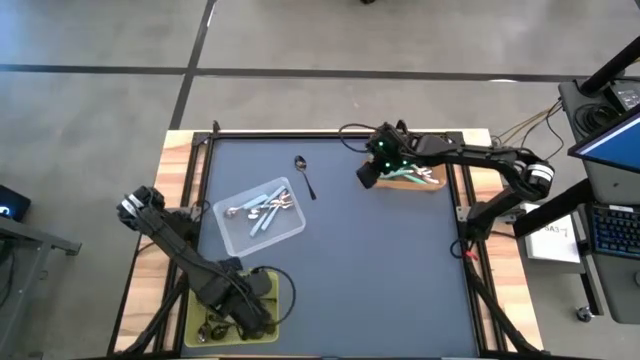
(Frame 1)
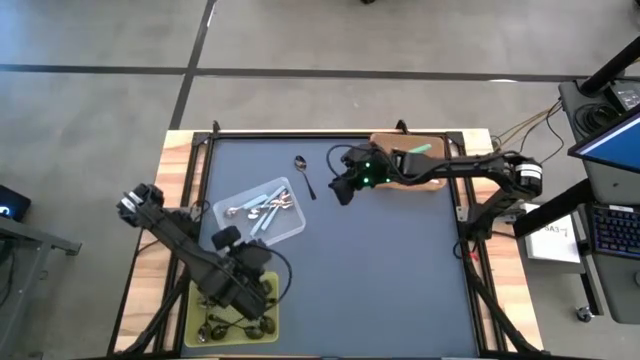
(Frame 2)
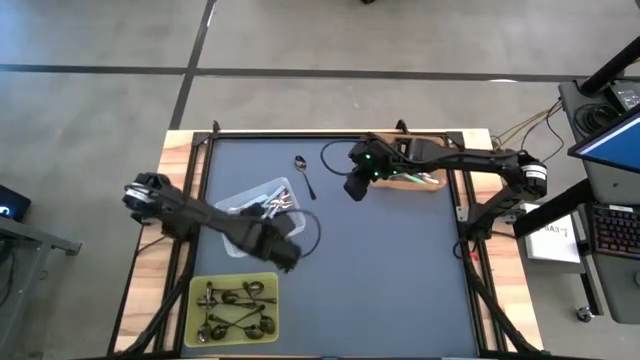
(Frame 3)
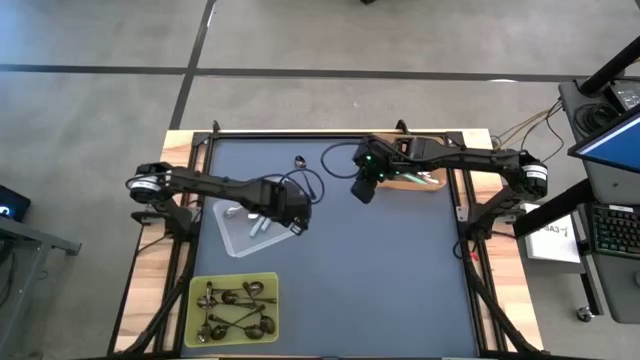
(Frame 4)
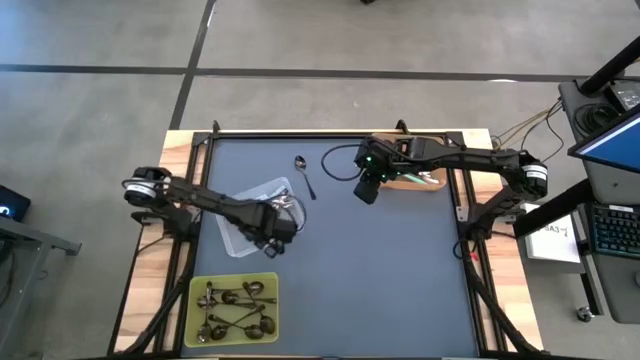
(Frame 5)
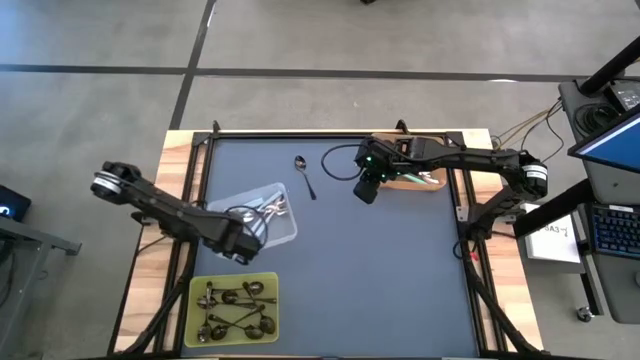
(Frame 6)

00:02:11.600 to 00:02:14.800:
Task: Sort silverware by color (type)
Put the black spoon into the yellow bin

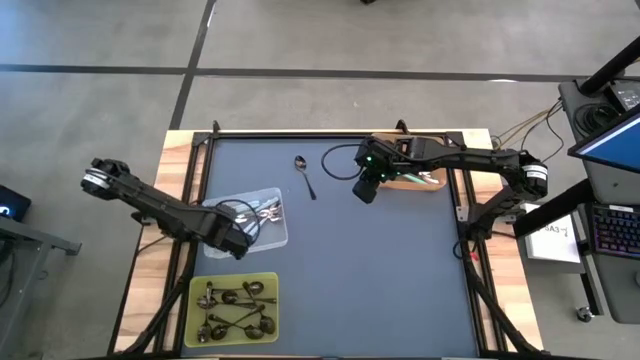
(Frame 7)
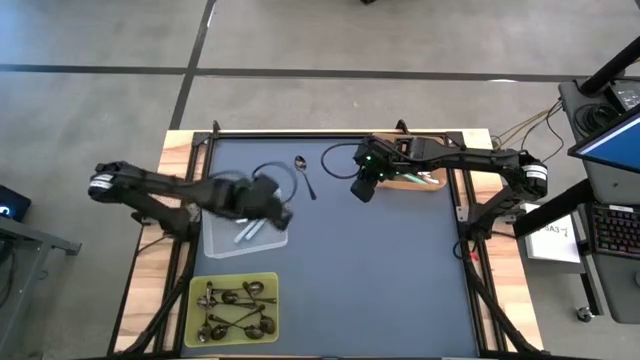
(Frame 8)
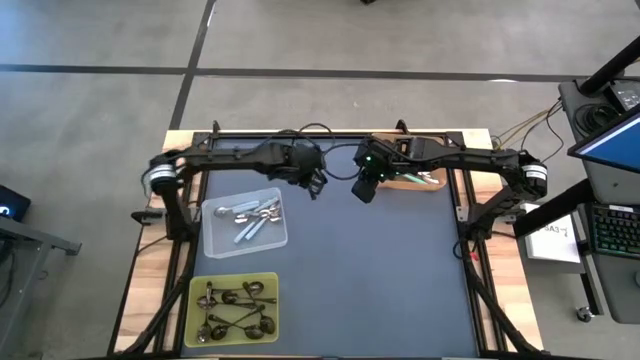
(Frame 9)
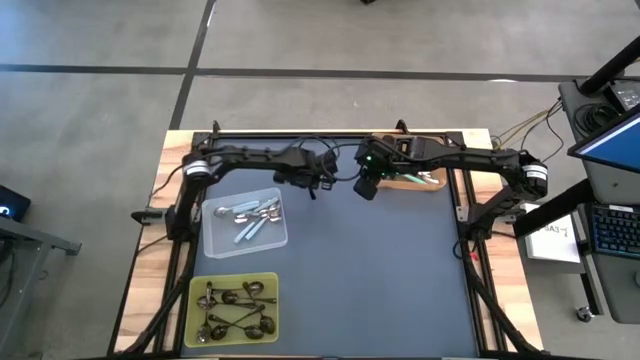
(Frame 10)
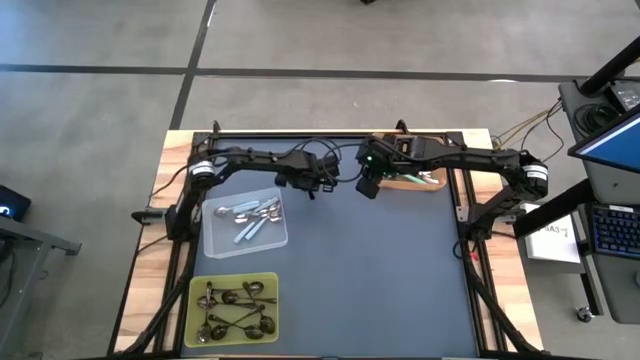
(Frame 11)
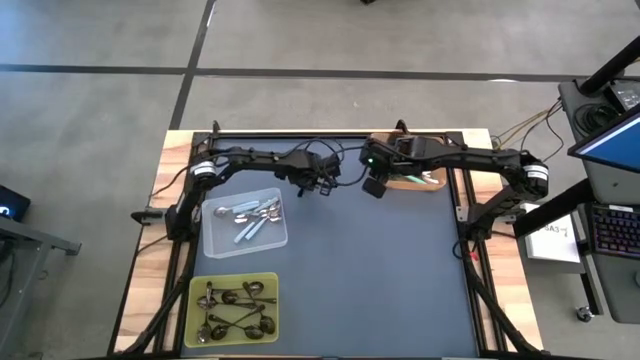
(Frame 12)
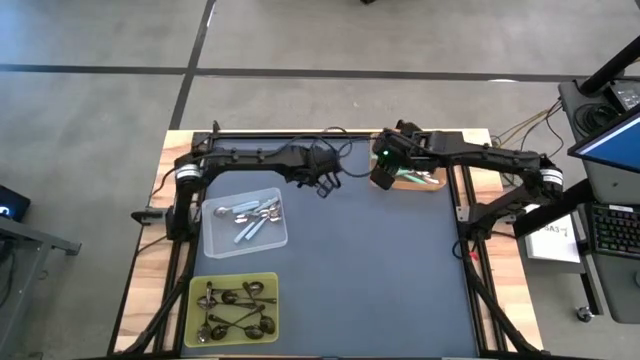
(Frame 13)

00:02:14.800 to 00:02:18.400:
Adjust the white bin

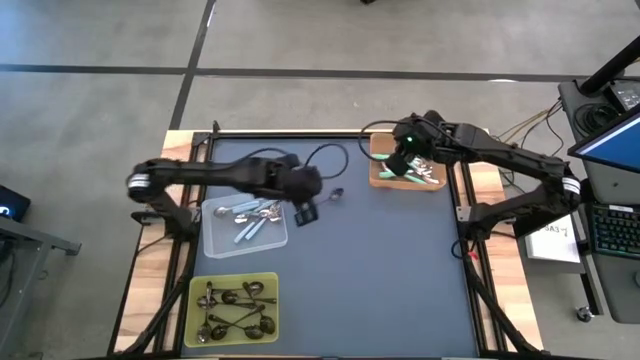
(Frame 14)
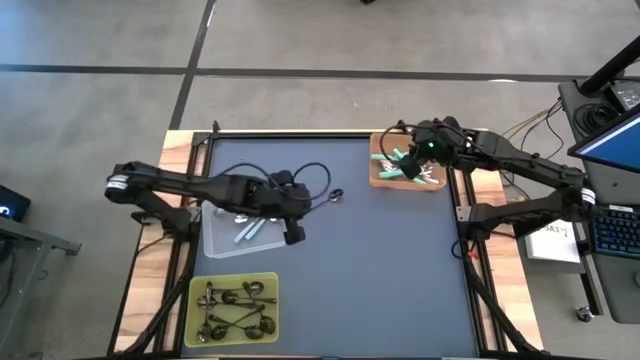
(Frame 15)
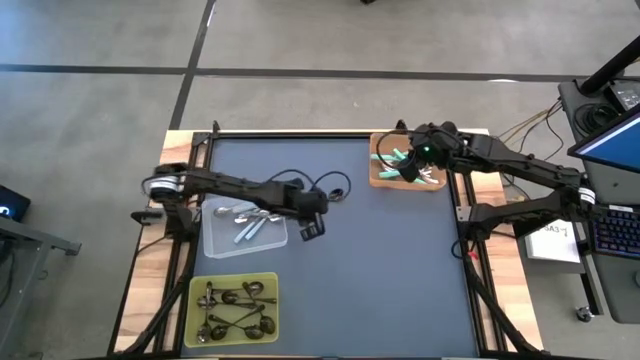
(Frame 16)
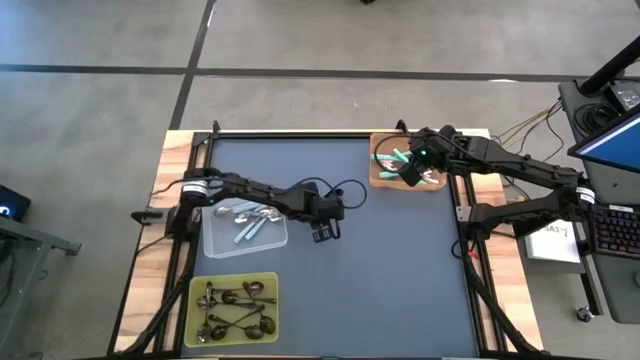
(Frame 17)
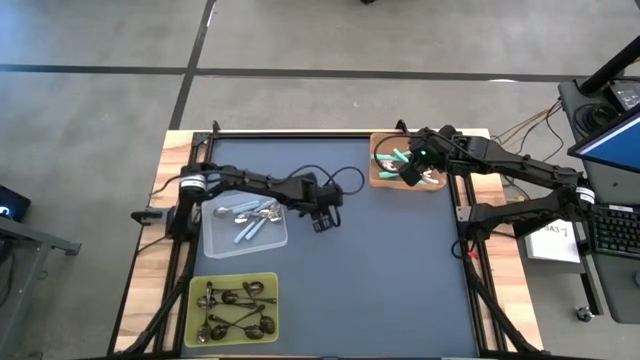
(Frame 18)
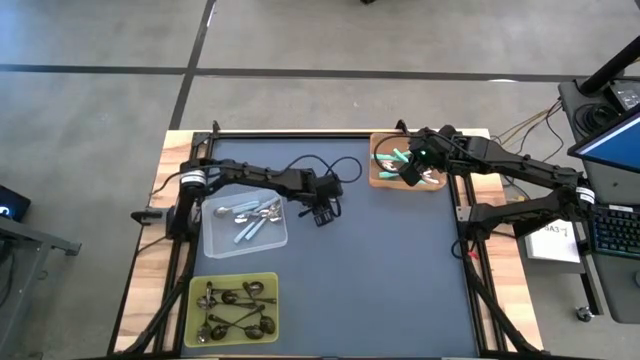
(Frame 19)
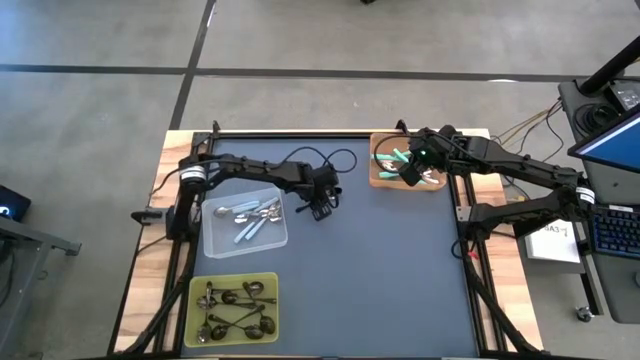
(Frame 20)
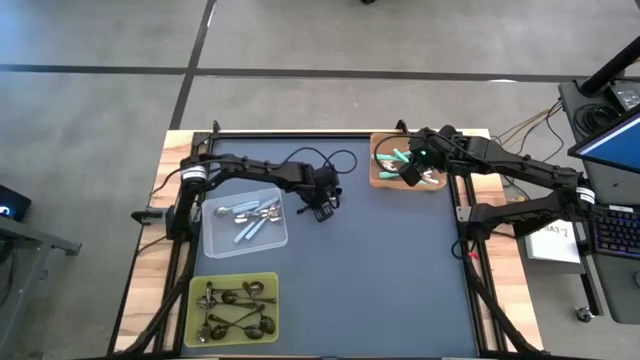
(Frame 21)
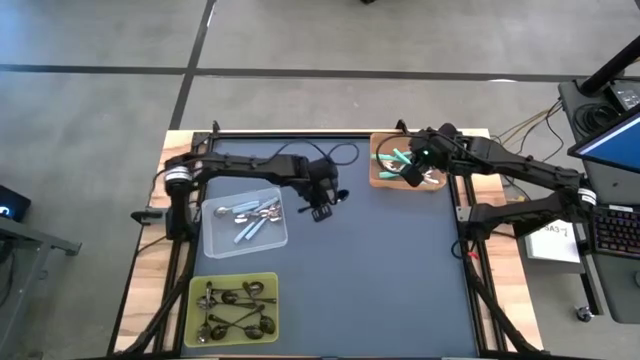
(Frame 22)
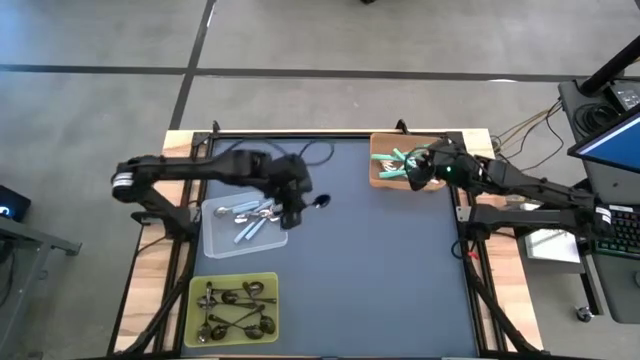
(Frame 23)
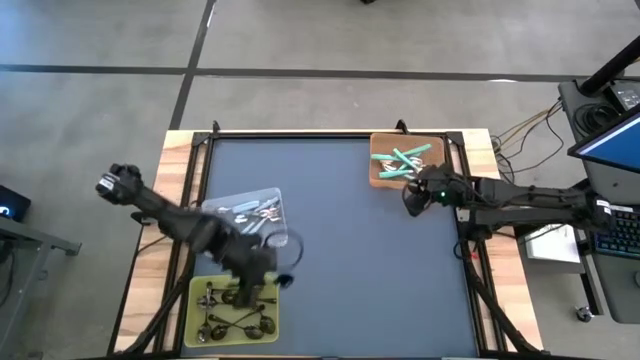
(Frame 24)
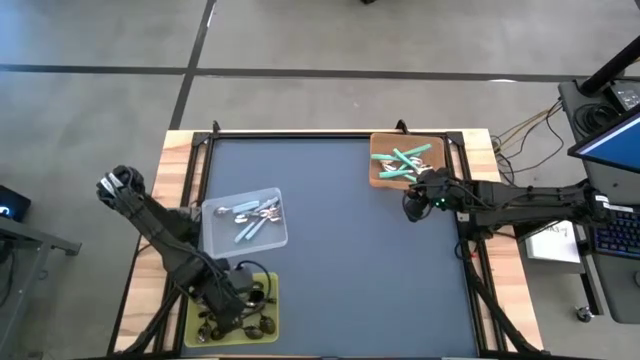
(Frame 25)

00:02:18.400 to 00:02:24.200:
Put the black spoon into the yellow bin

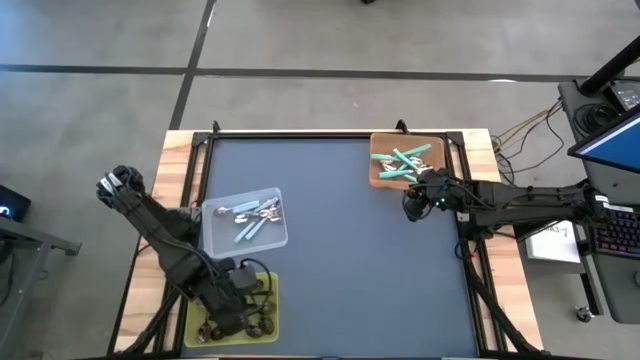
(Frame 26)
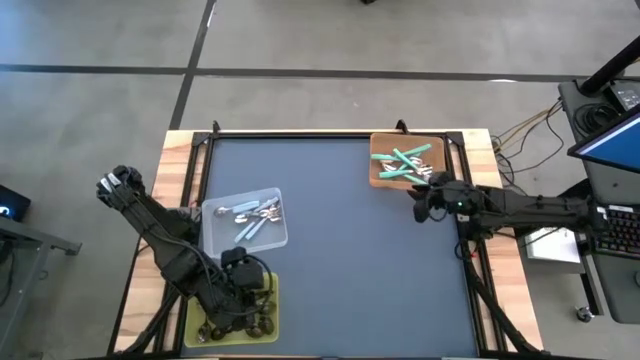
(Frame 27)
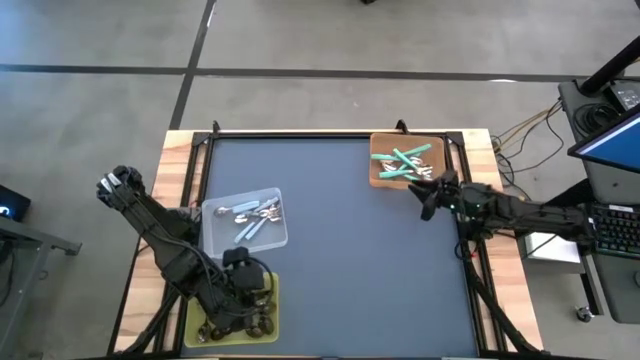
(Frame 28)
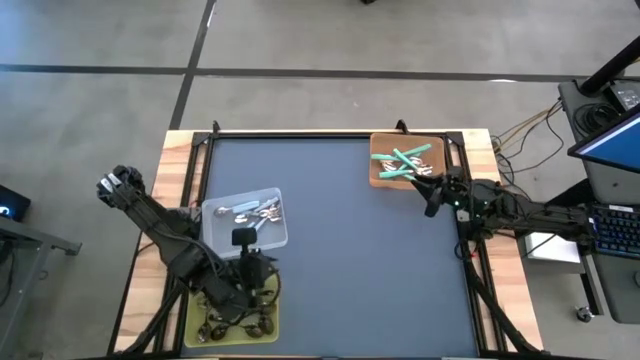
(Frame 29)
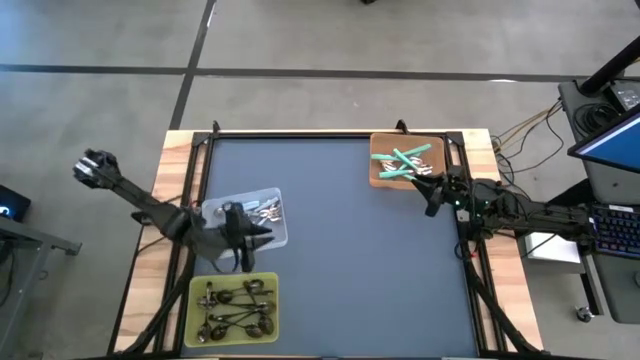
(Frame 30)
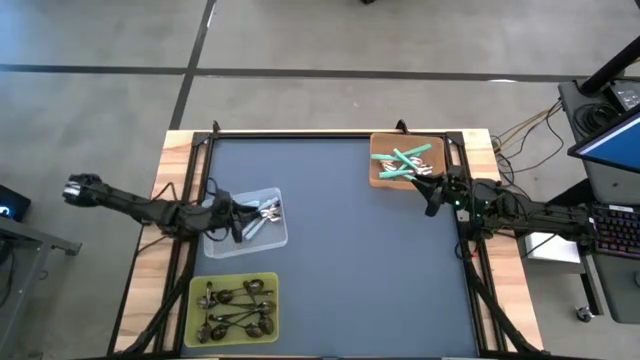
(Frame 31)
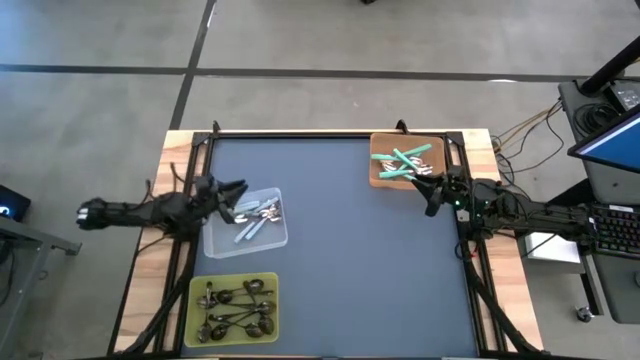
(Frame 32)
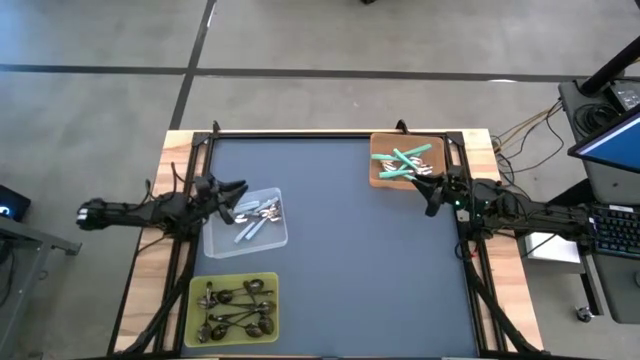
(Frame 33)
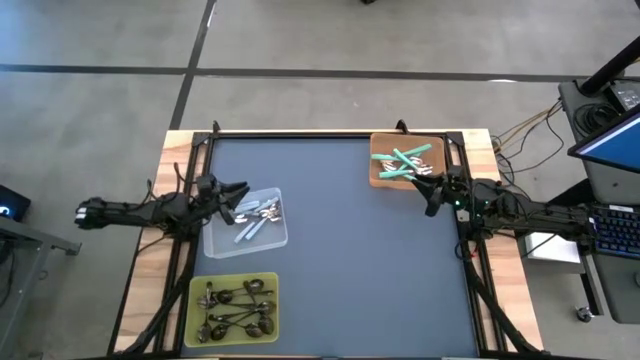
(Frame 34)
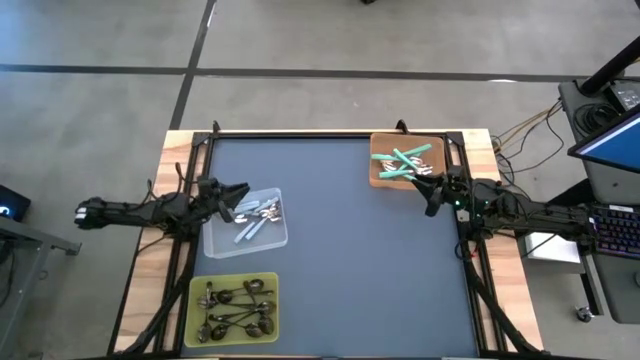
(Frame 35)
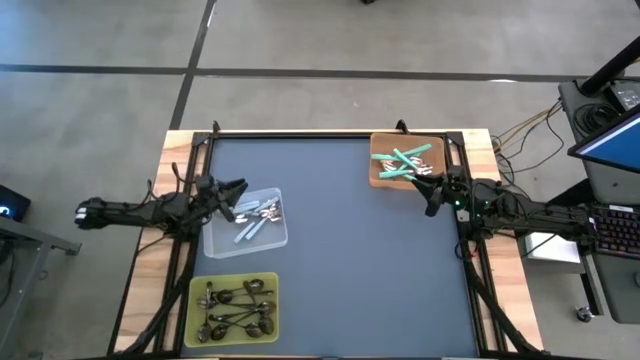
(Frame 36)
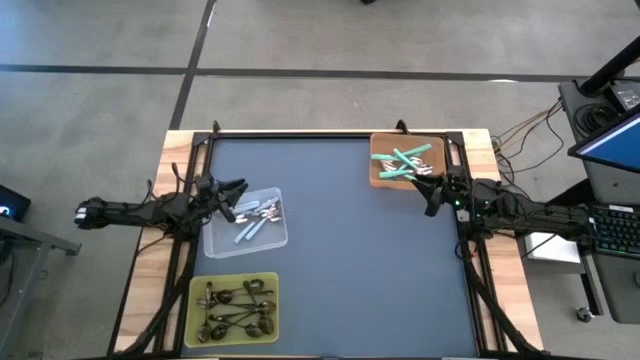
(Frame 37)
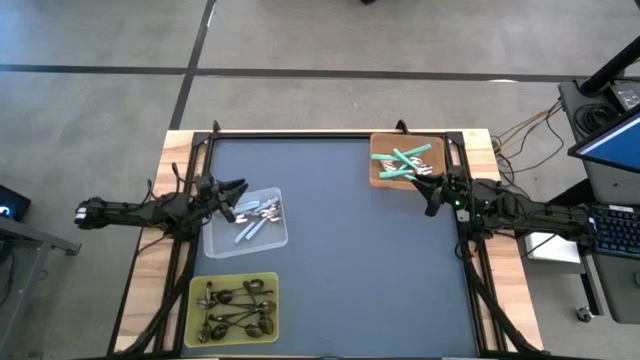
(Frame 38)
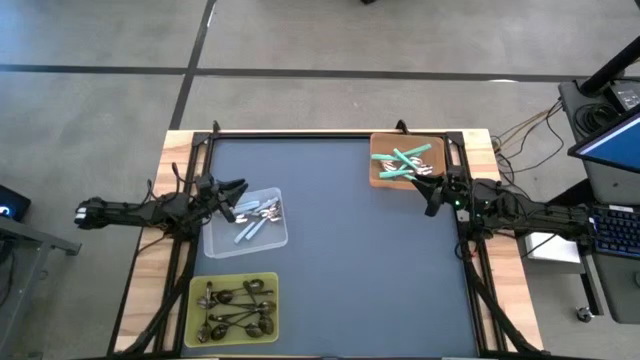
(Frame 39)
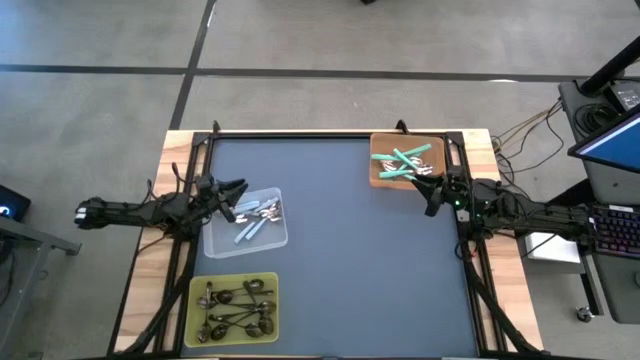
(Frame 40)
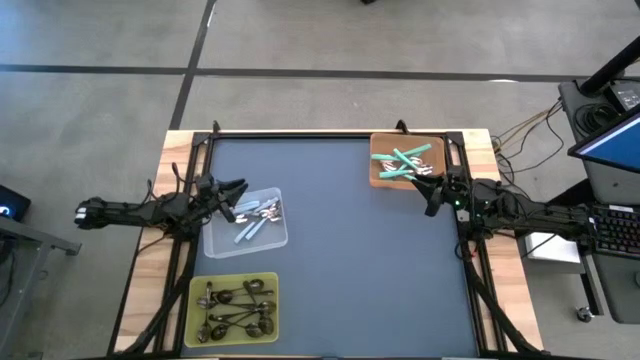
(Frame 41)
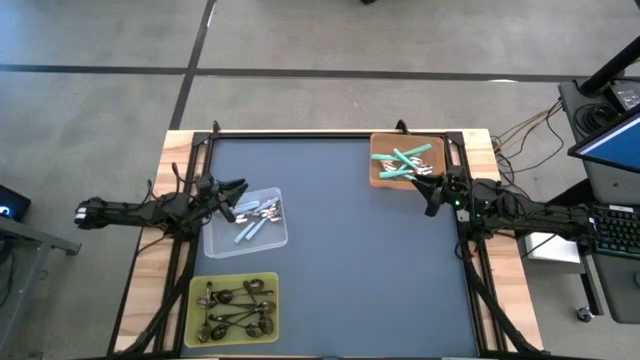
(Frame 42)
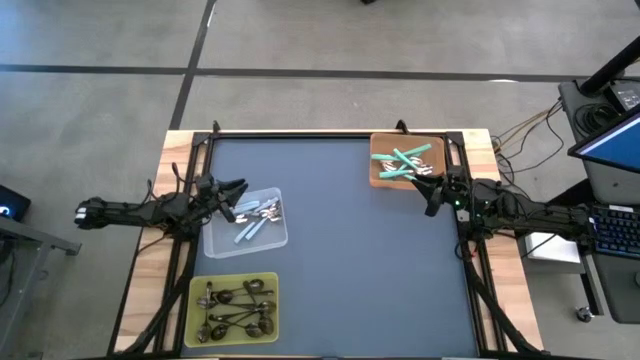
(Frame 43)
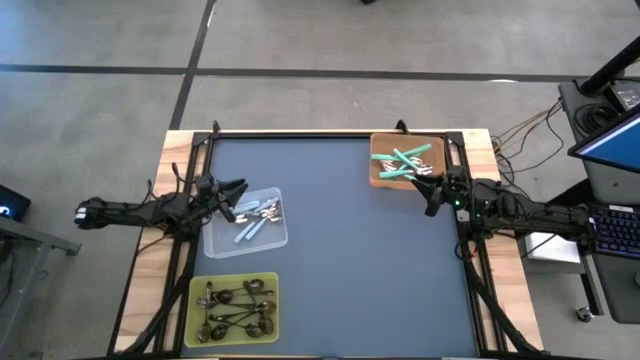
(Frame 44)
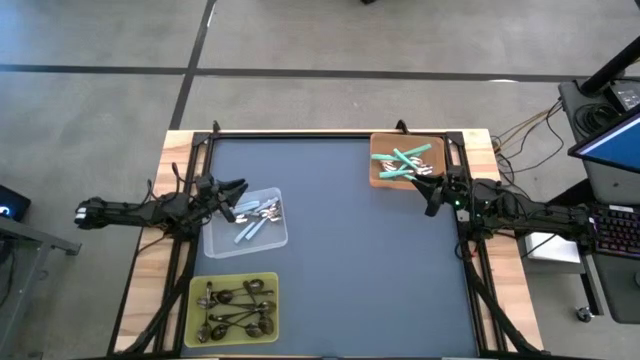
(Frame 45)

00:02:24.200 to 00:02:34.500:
Return to Home Position
